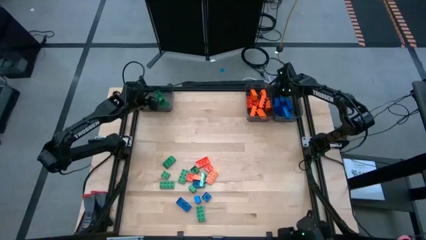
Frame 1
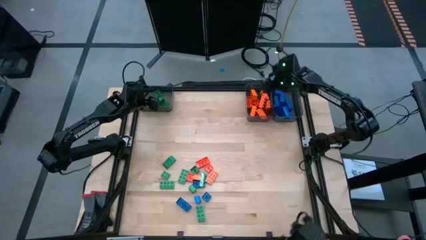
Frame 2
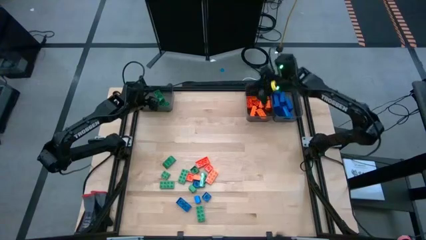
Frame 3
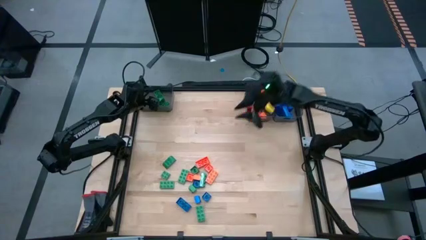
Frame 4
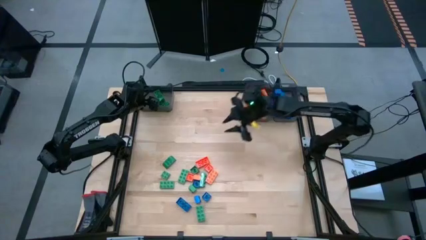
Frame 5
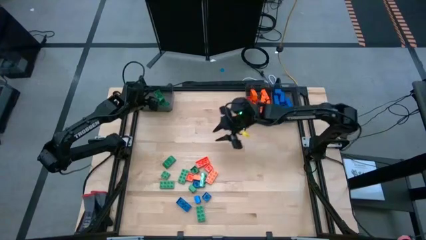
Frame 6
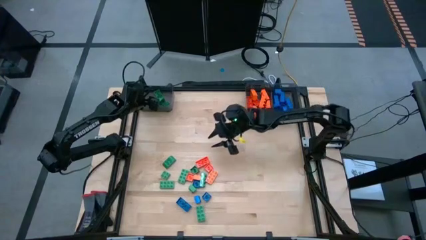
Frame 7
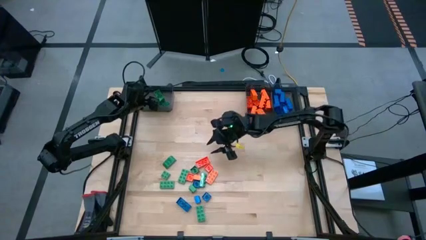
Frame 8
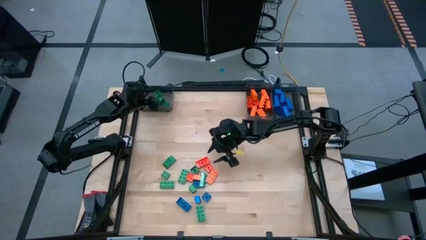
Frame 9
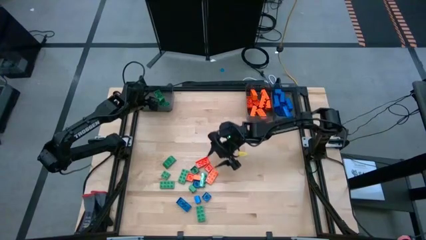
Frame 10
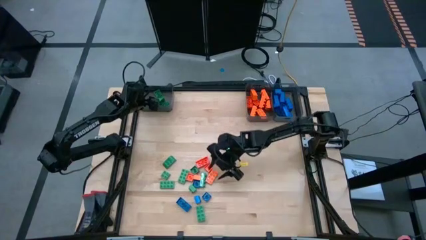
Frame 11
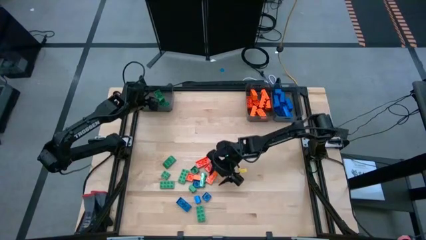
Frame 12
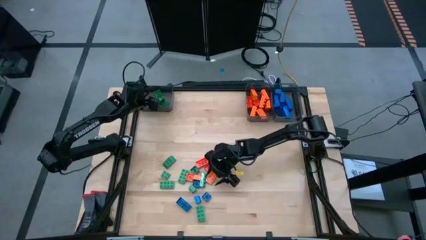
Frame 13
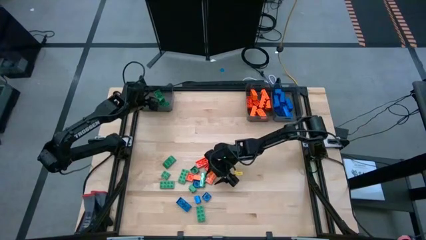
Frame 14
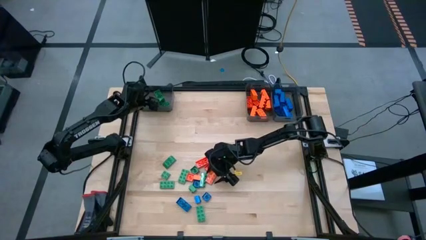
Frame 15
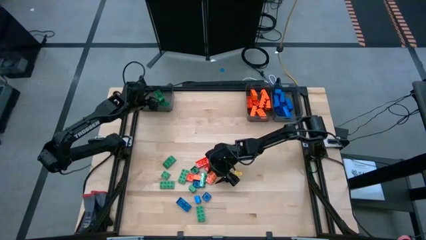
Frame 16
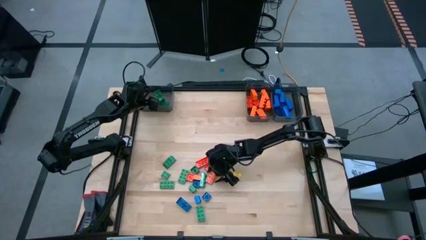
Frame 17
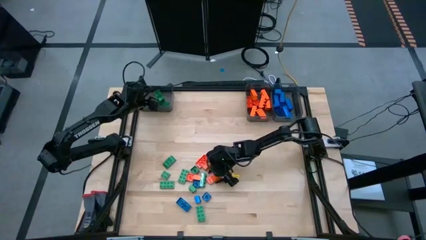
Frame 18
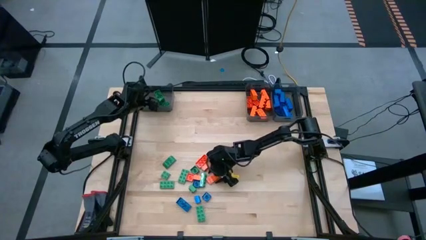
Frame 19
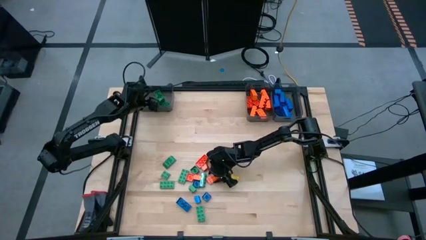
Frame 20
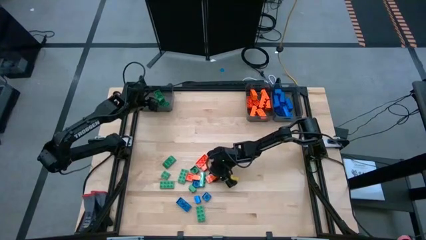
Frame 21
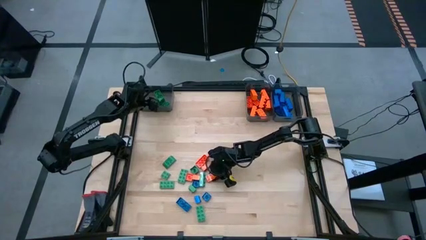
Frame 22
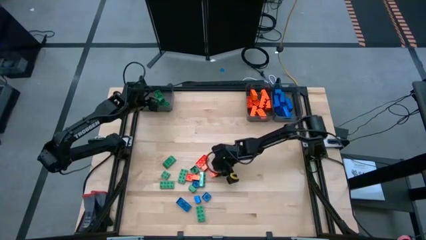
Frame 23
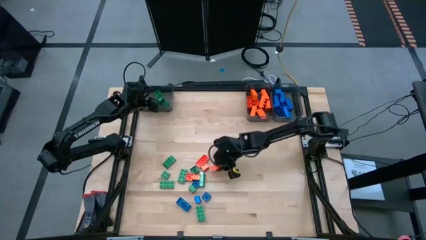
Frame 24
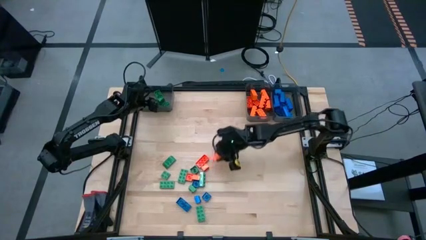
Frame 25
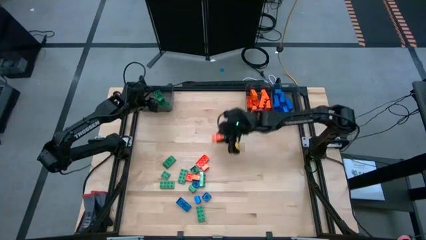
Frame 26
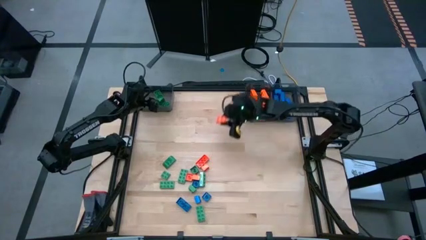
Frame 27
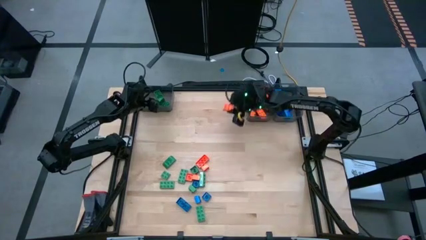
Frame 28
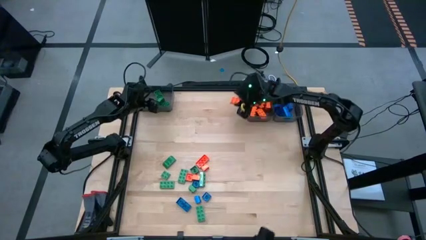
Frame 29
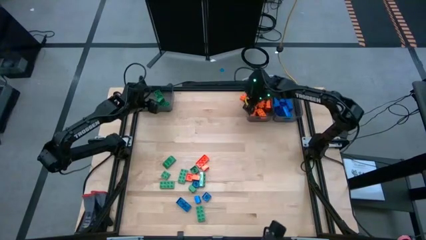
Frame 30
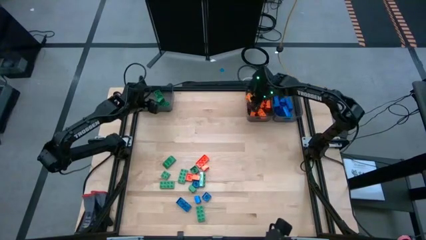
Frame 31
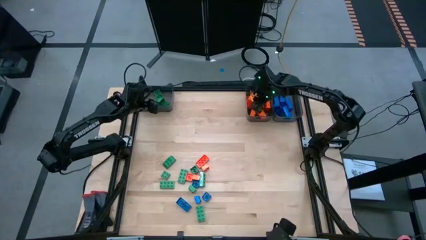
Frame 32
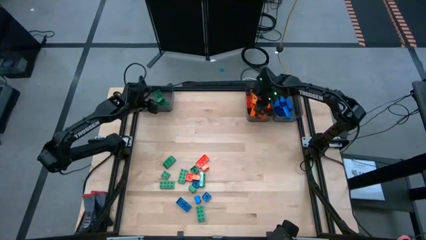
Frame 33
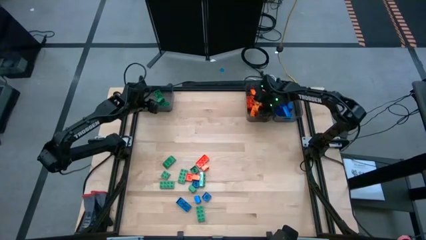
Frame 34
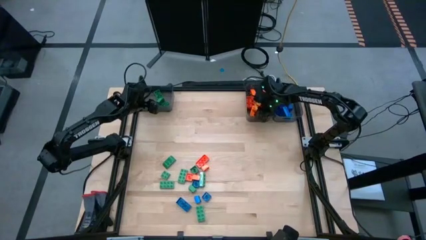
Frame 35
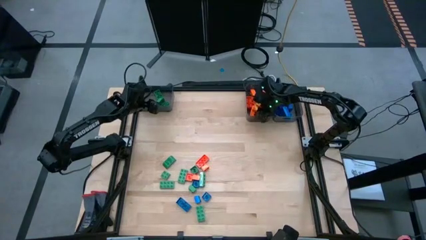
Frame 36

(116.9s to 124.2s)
Task: Sort blocks
Put the orange game piece into the middle black bin

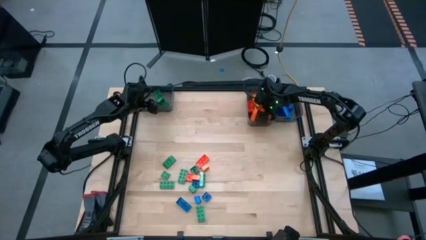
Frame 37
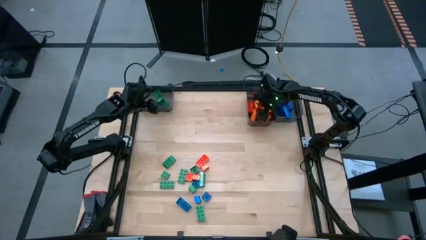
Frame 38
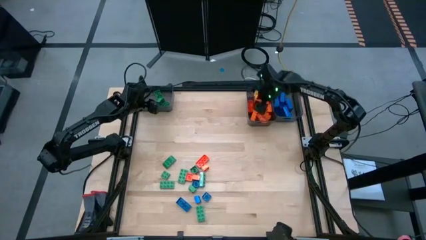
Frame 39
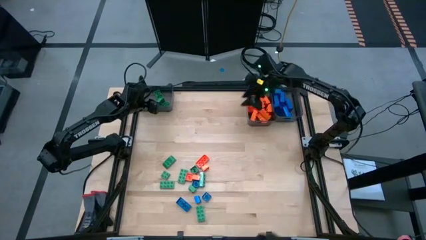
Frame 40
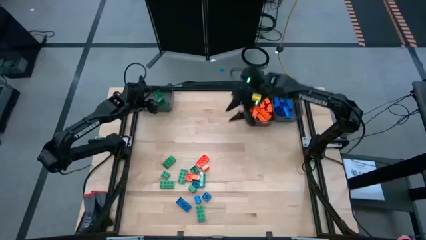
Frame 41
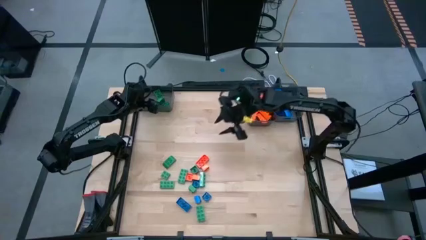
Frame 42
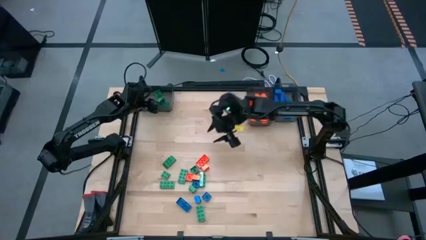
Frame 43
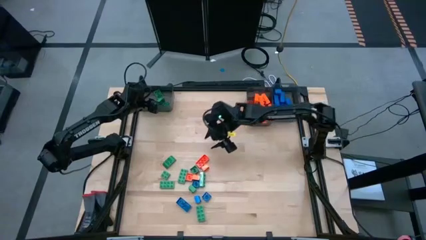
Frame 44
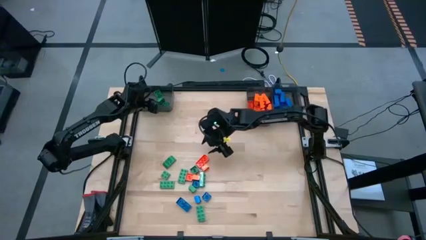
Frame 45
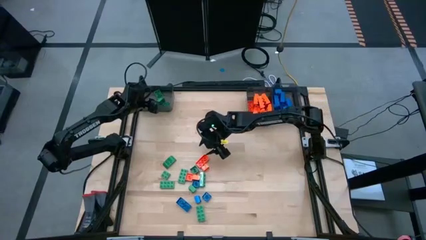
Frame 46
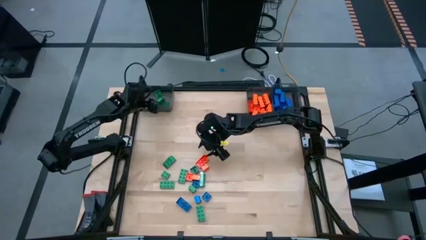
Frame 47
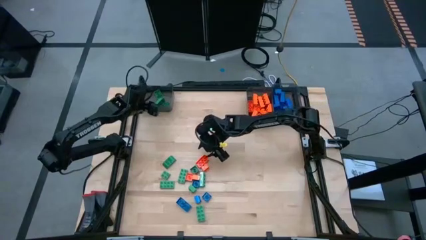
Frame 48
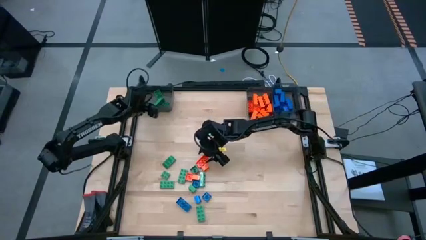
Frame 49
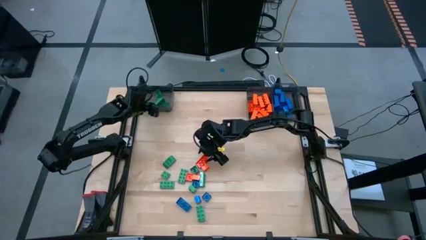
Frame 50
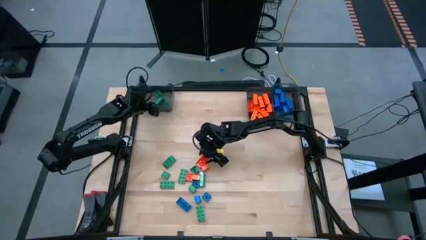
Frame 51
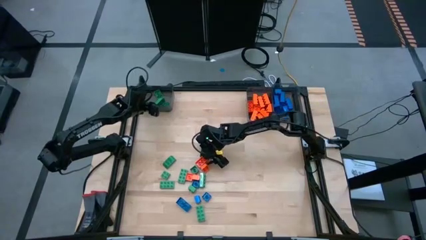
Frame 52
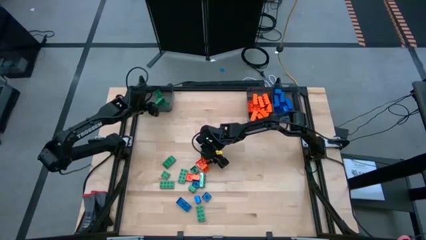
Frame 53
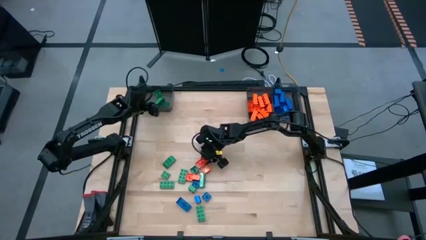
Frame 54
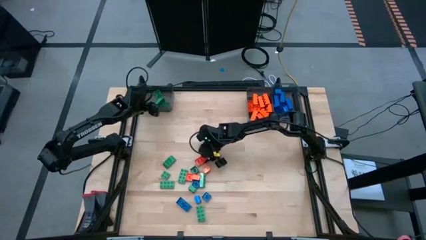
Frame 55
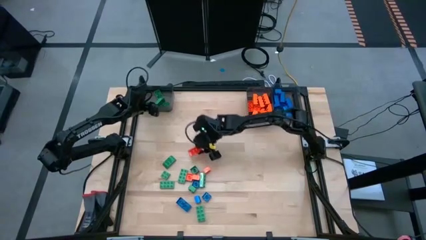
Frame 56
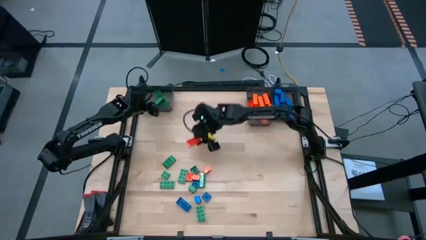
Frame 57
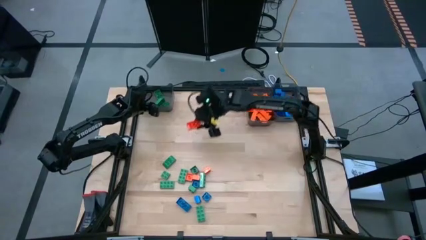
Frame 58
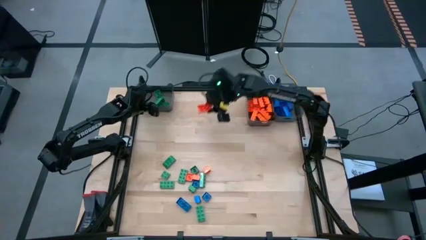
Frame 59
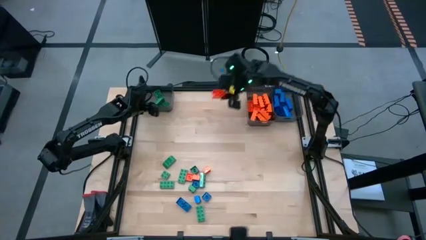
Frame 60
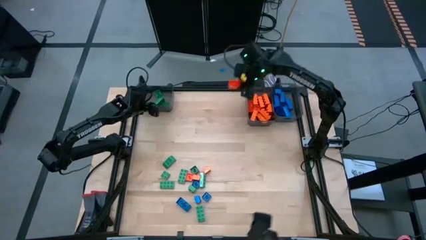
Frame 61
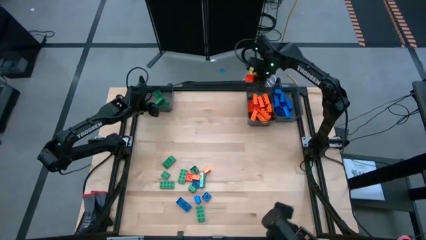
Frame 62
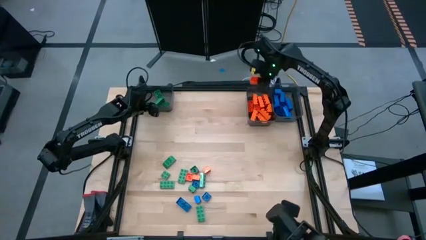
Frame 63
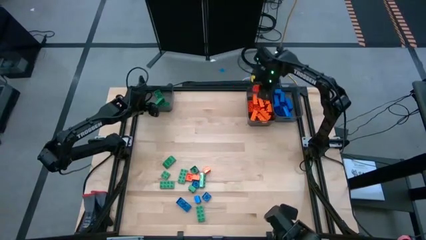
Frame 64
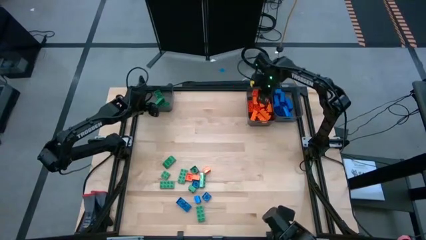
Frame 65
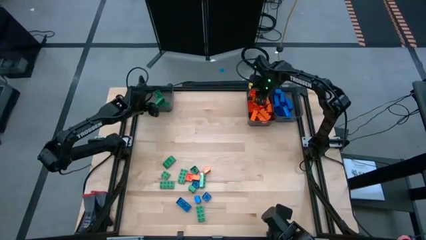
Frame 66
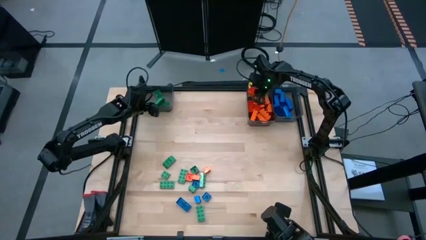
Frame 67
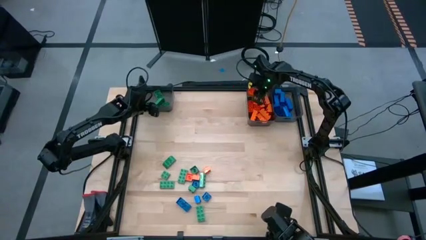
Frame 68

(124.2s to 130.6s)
Put the orange game piece into the middle black bin

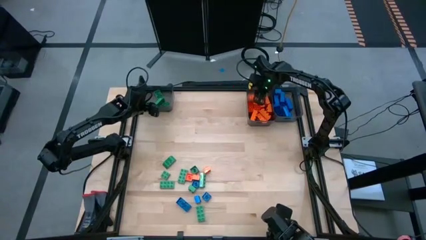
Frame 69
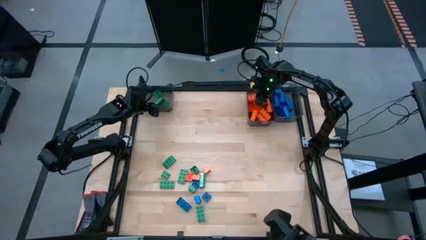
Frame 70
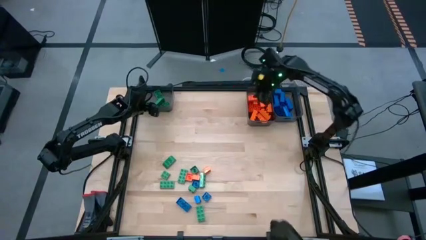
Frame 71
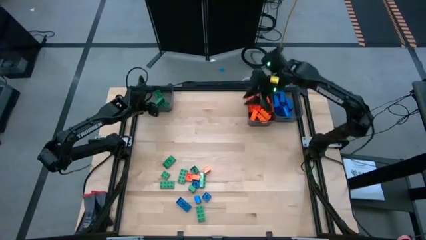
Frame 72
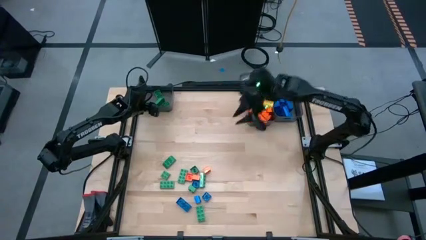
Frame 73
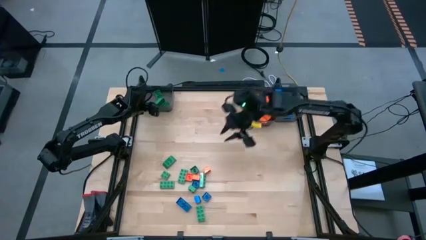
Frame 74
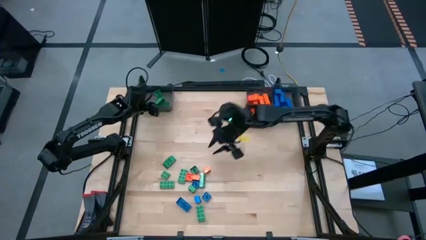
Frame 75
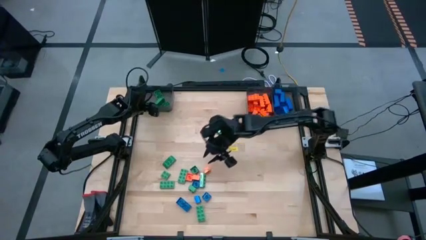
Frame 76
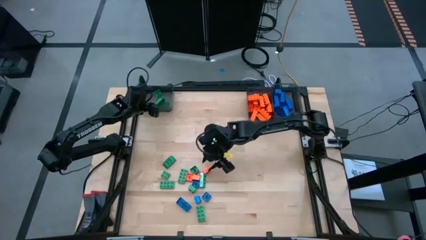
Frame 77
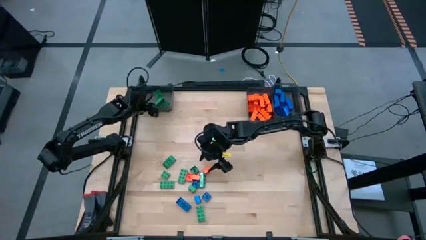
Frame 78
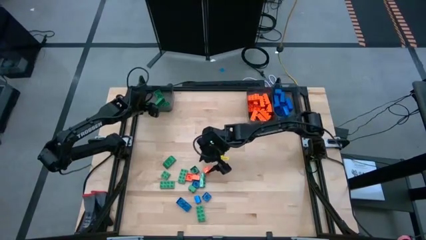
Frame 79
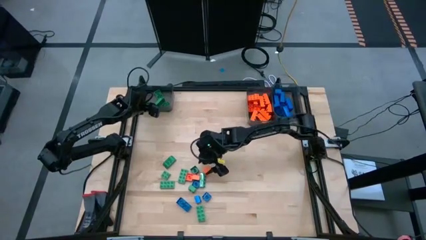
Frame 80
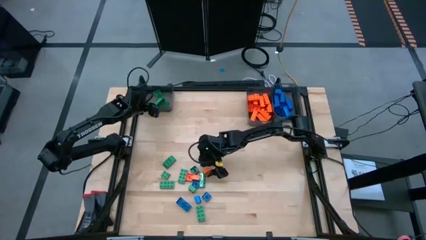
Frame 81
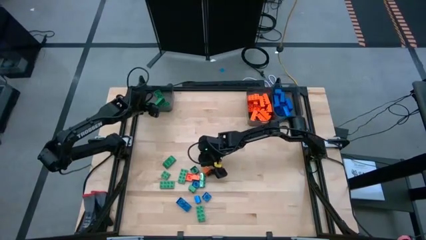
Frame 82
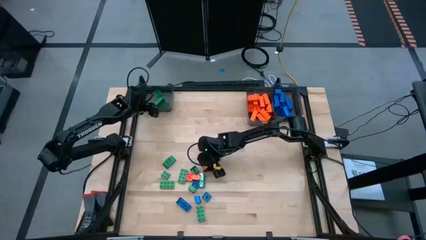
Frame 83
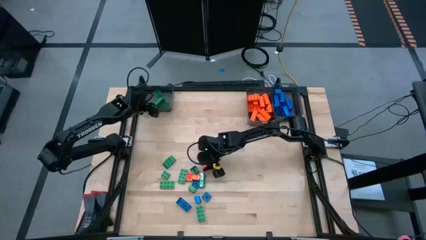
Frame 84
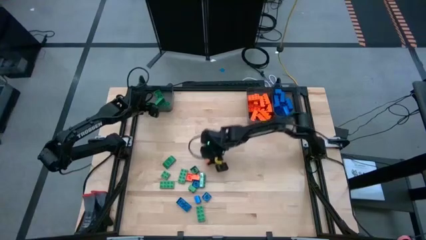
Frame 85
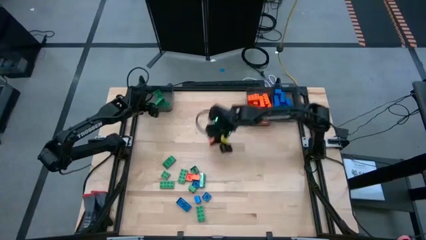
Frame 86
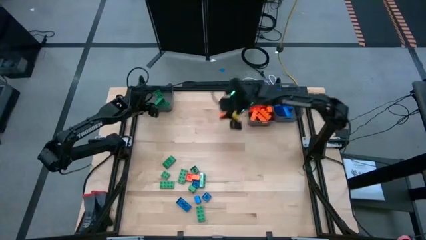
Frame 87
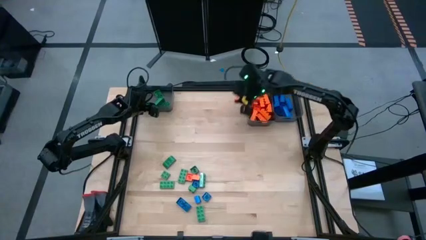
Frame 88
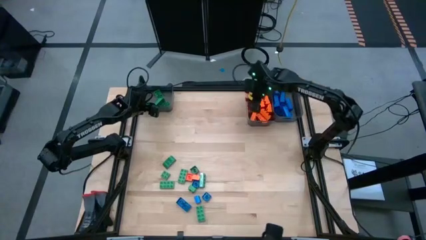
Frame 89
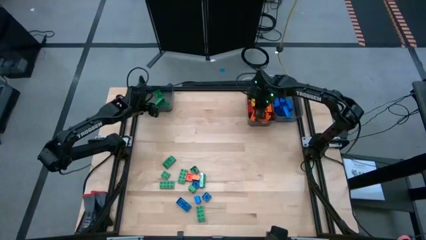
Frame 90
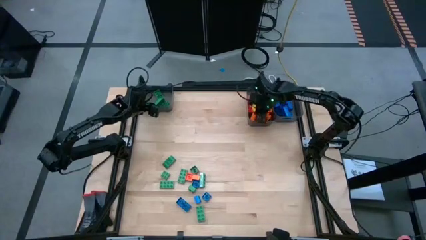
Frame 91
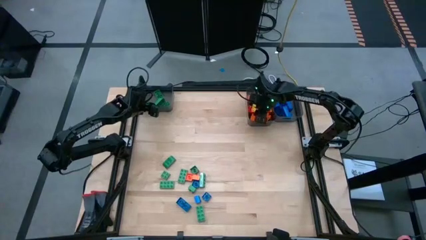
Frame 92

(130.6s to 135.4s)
Put the orange game piece into the middle black bin
